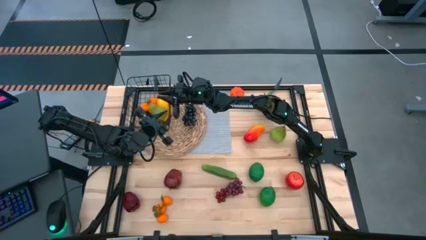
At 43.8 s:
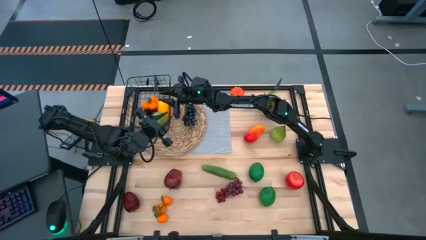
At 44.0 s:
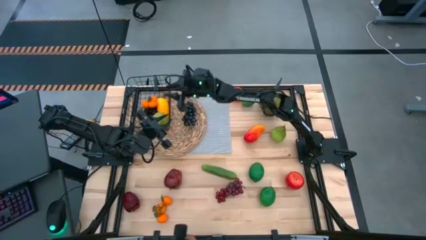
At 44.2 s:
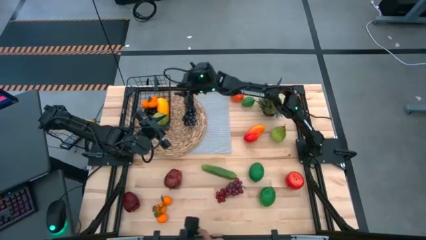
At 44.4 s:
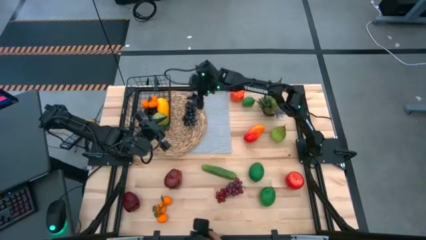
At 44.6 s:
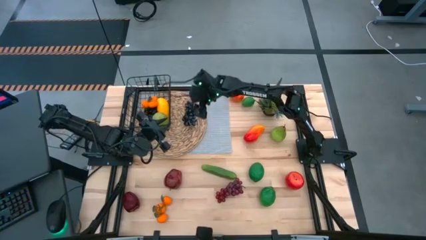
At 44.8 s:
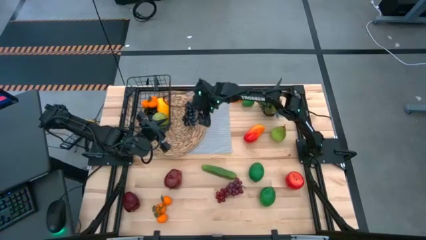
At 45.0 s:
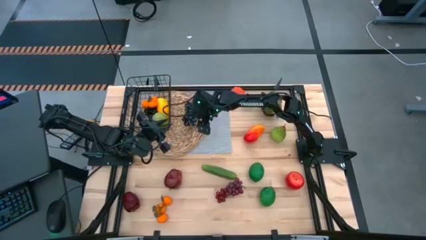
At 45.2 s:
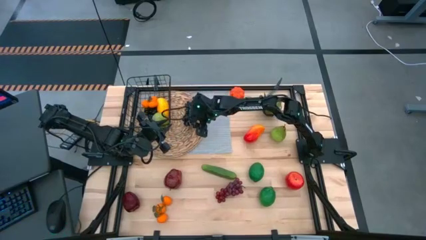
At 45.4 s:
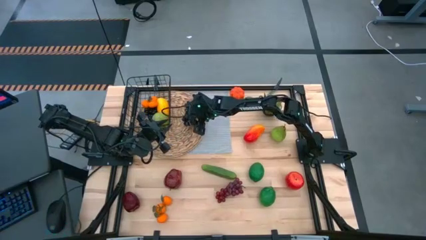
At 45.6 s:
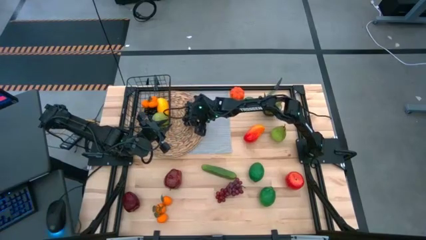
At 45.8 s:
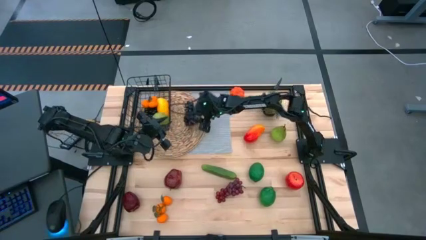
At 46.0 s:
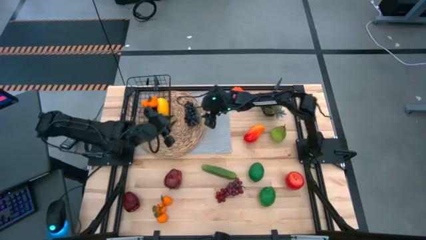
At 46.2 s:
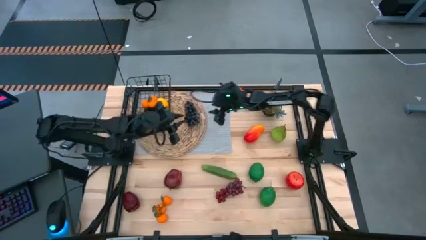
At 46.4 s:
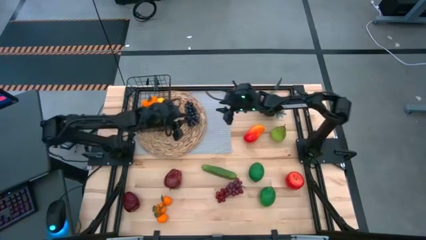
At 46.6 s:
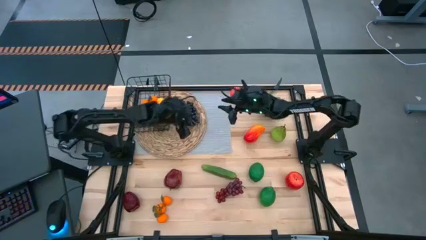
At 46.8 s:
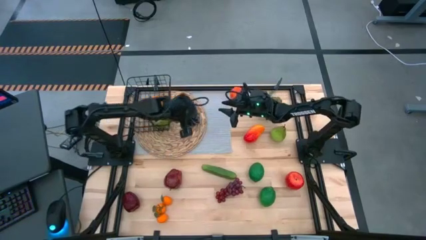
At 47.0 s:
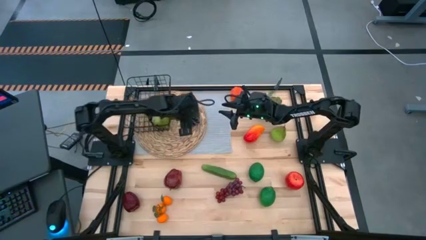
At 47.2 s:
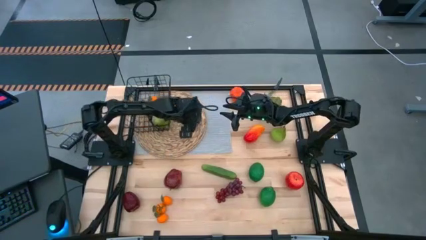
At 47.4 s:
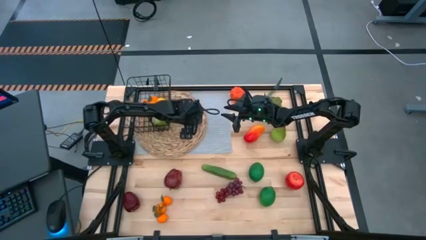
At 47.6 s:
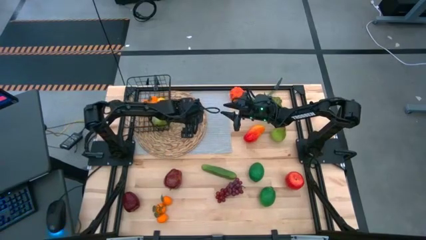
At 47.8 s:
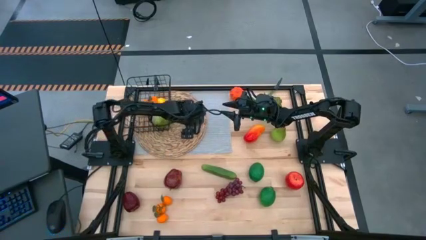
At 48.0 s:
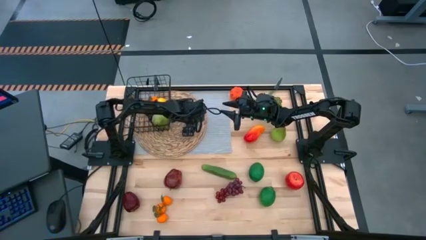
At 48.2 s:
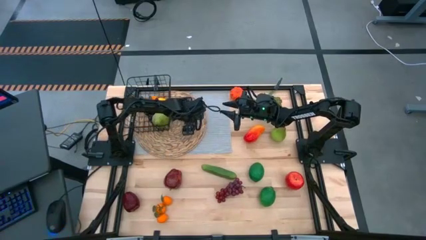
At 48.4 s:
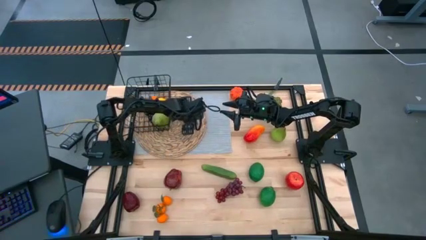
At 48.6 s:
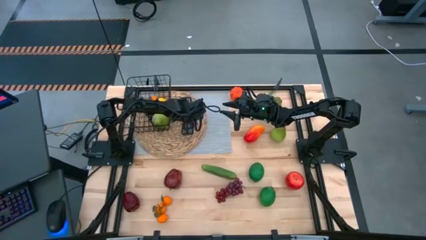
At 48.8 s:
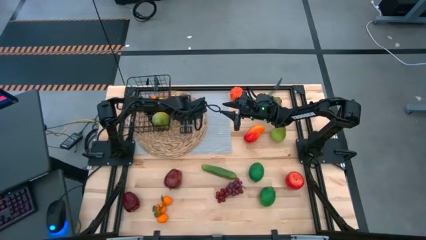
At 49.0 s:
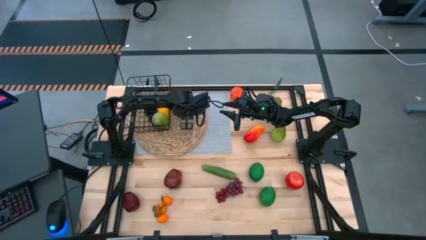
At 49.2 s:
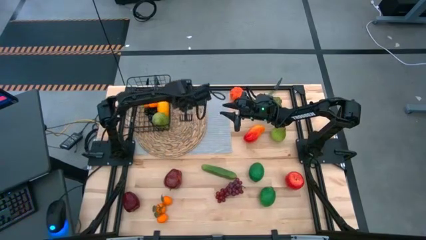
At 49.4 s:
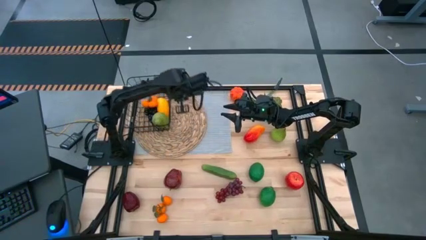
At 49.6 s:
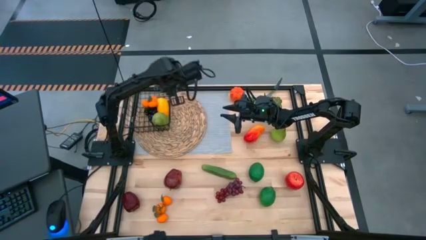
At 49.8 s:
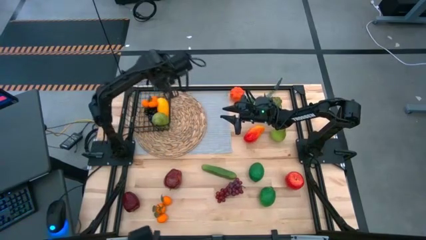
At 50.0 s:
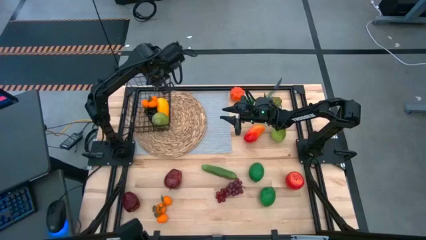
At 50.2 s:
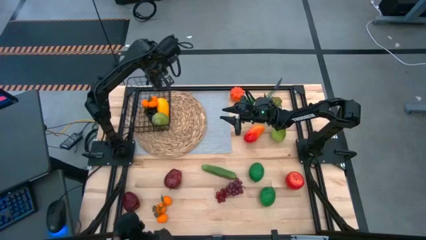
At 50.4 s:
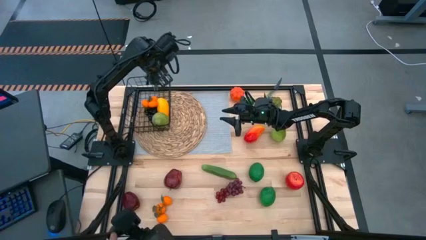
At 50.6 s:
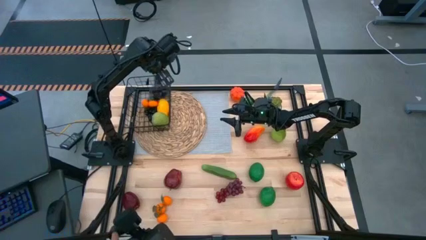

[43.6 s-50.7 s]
Task: Build produce basket
Put the black grapes into the wire basket

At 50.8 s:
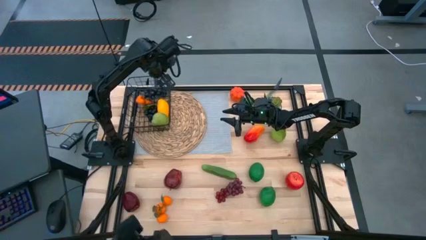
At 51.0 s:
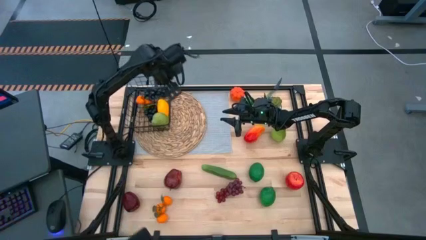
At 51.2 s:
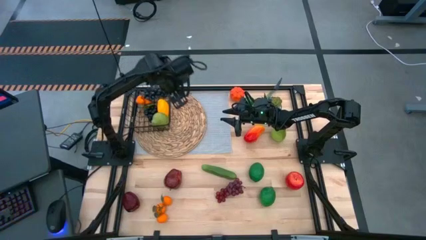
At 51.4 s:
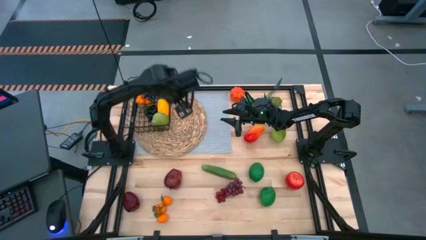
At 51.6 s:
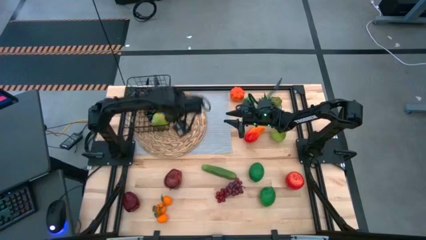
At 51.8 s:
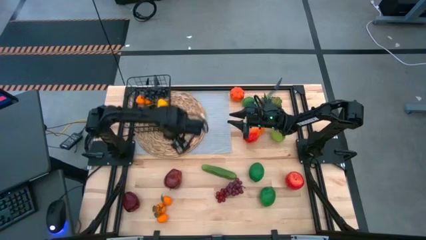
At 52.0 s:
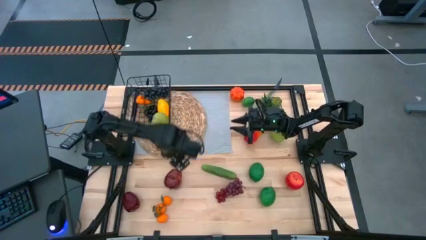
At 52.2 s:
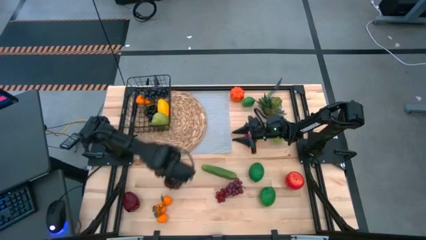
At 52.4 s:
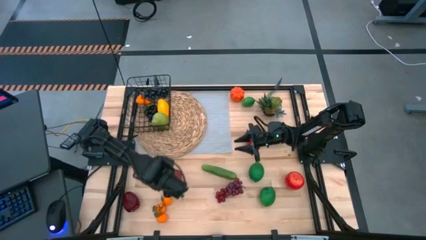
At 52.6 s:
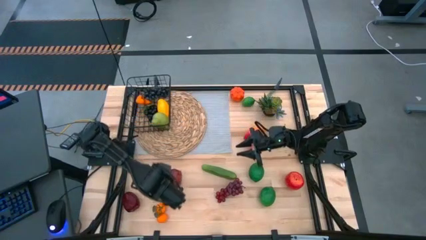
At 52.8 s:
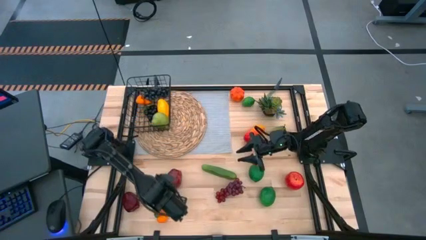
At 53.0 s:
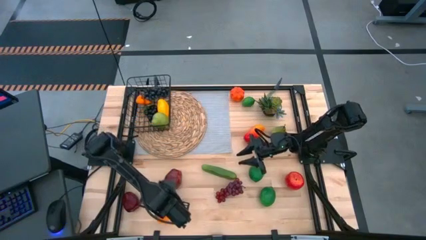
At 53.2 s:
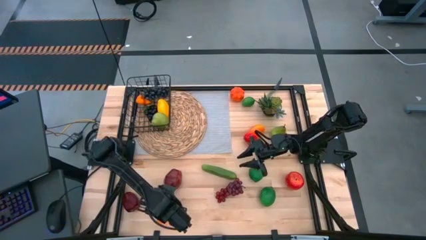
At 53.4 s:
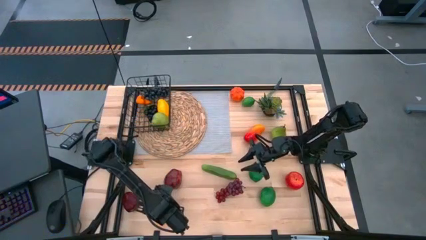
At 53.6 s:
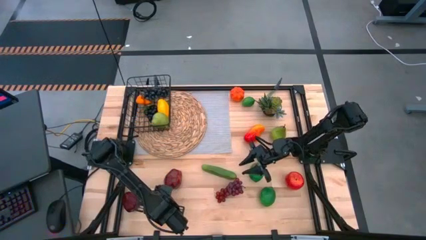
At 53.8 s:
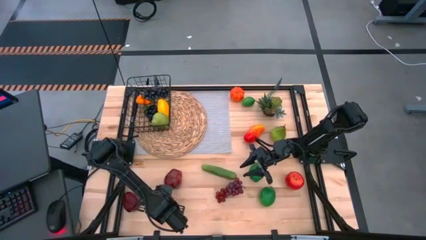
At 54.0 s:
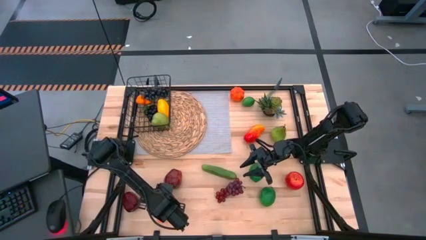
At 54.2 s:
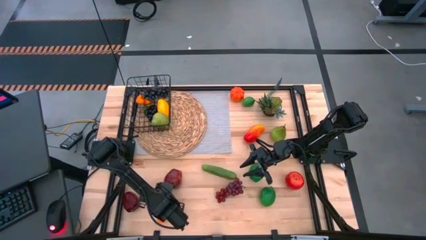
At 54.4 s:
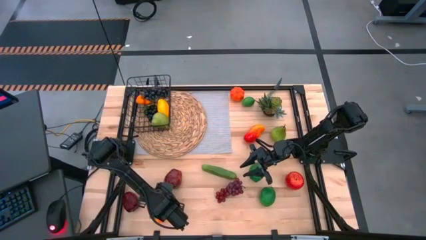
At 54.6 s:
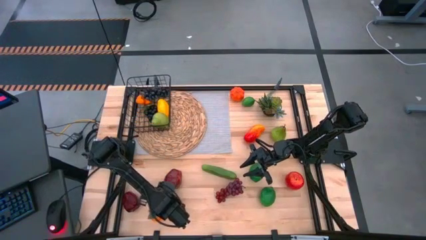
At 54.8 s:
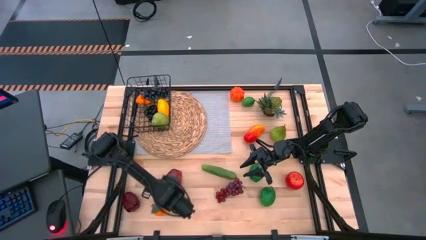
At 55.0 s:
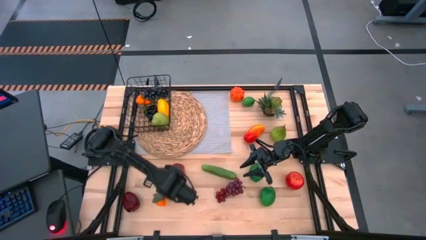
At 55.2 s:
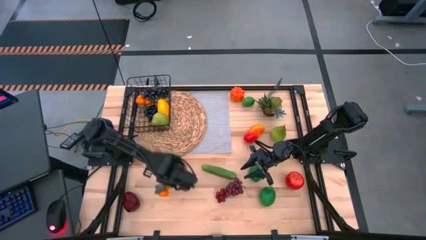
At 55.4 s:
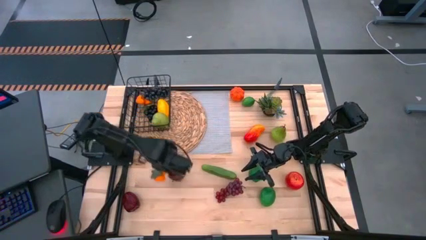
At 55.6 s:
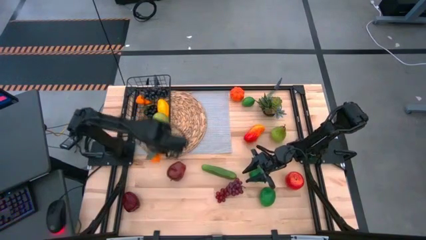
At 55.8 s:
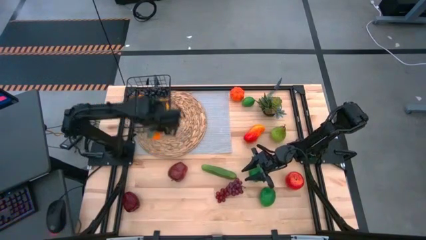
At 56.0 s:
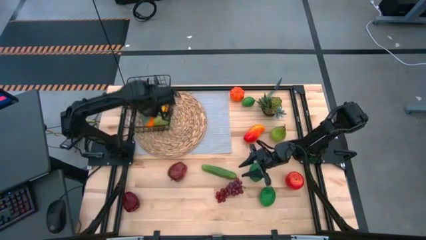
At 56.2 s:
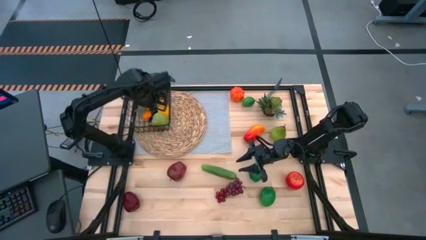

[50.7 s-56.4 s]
Put the orange tangerine into the wire basket
